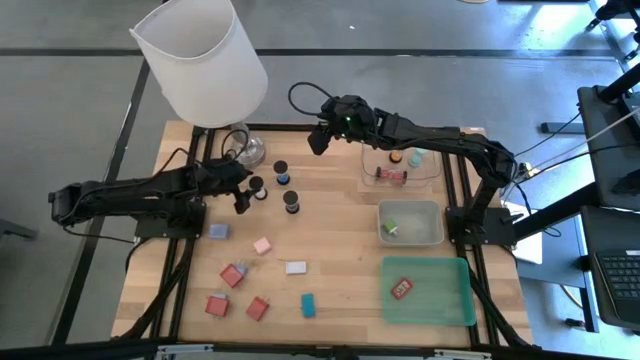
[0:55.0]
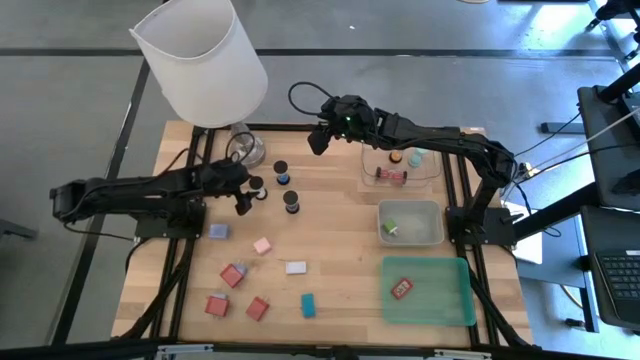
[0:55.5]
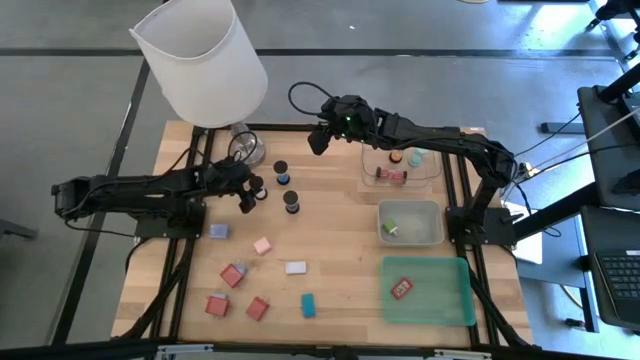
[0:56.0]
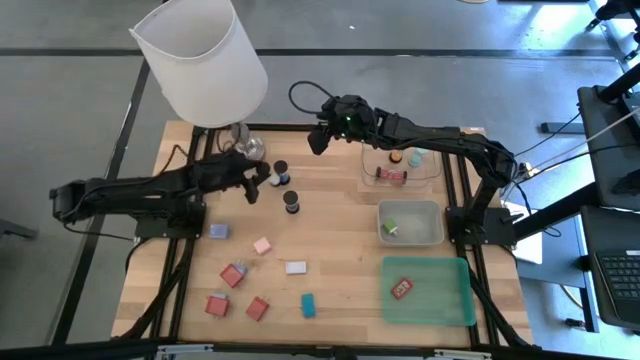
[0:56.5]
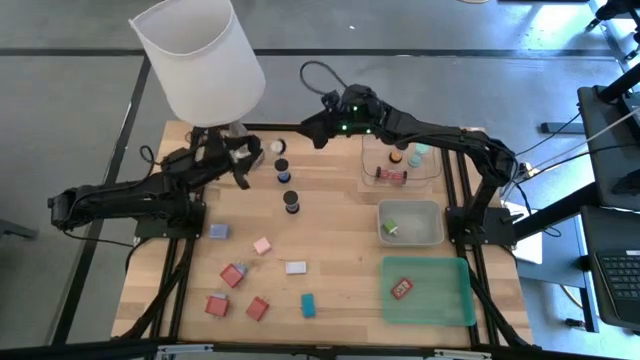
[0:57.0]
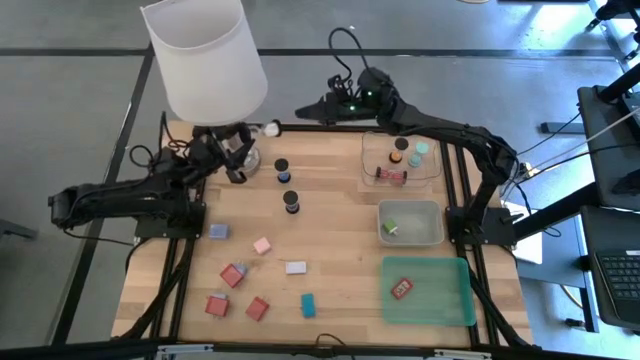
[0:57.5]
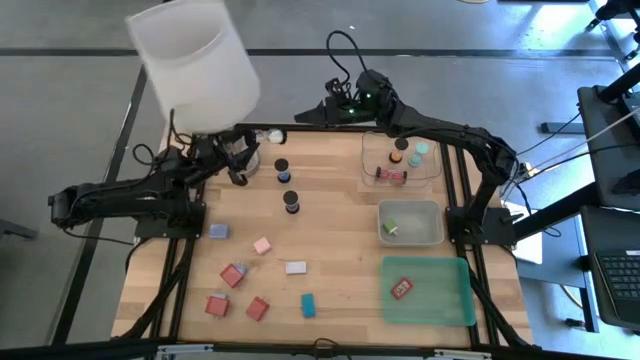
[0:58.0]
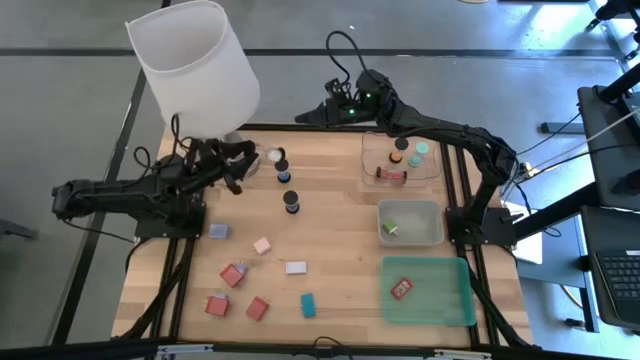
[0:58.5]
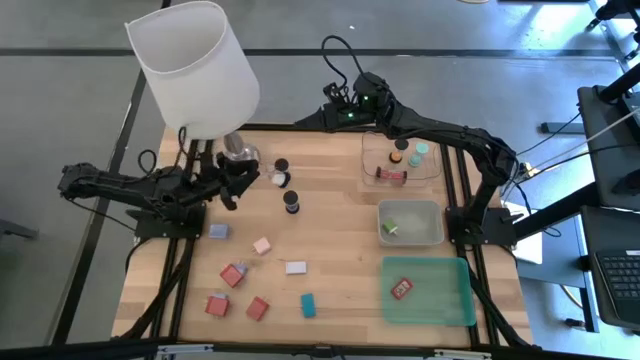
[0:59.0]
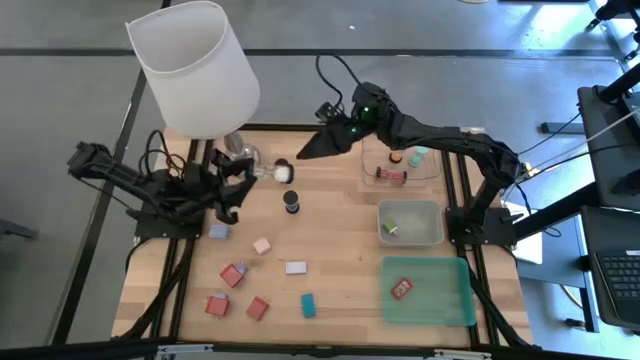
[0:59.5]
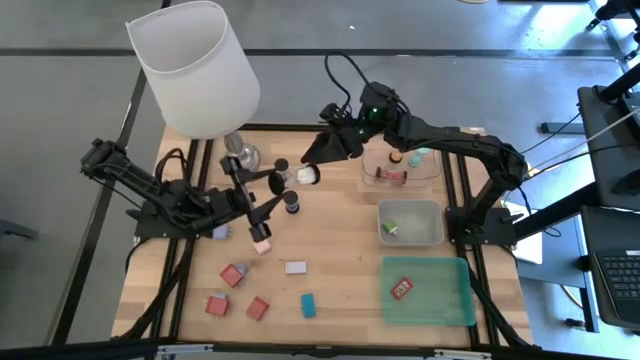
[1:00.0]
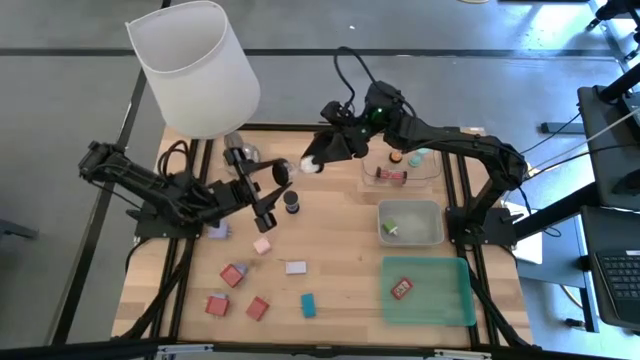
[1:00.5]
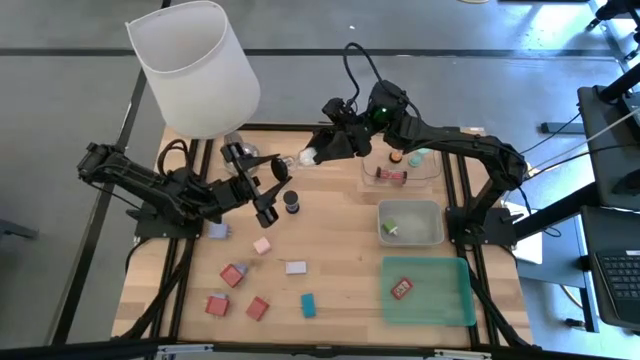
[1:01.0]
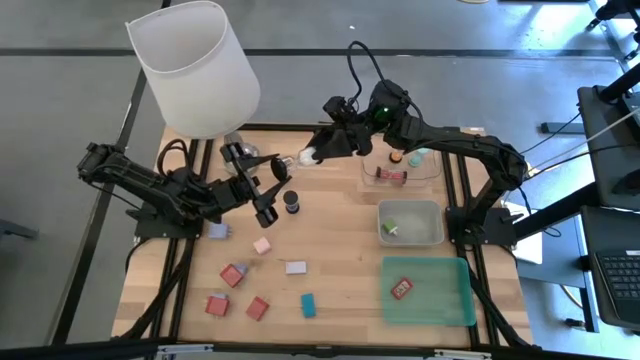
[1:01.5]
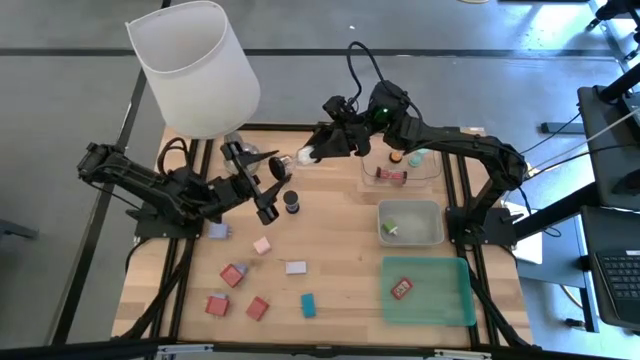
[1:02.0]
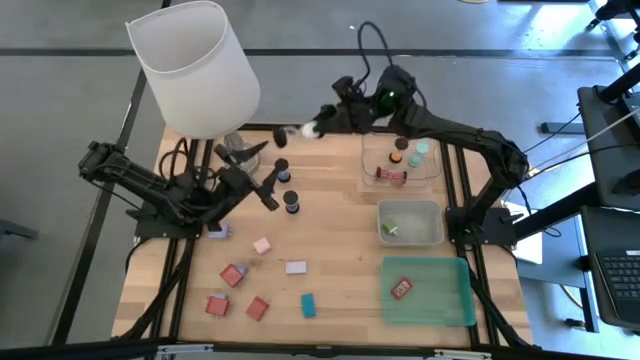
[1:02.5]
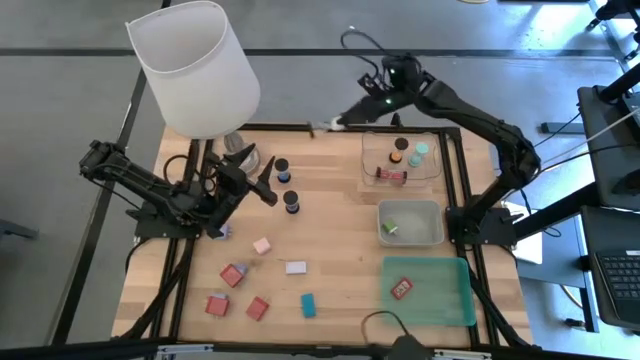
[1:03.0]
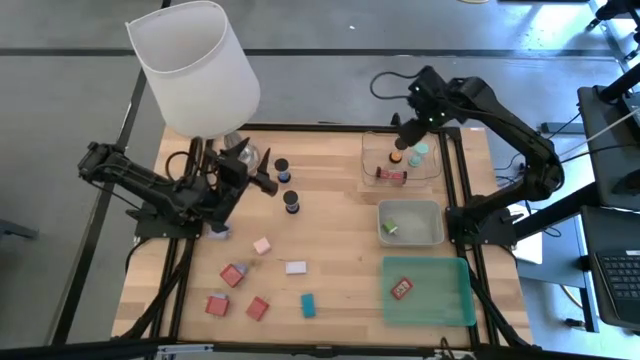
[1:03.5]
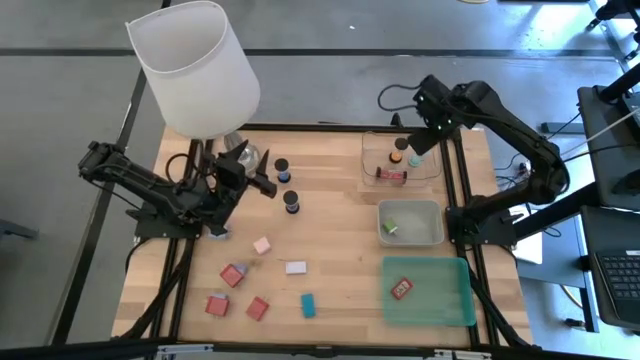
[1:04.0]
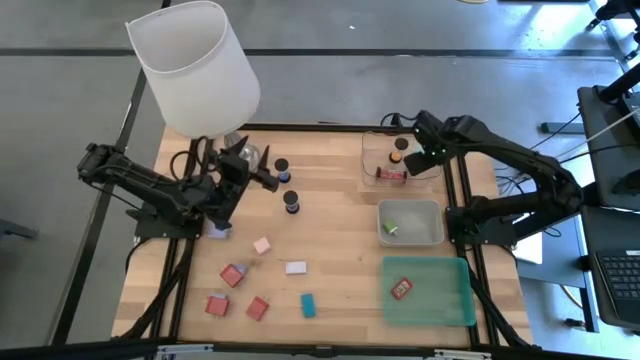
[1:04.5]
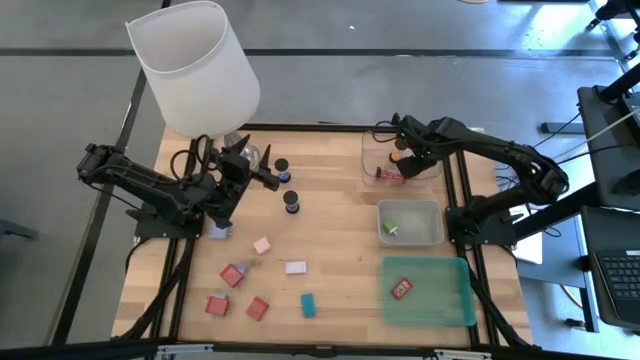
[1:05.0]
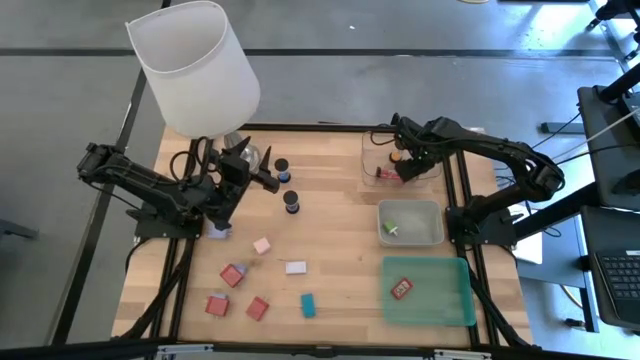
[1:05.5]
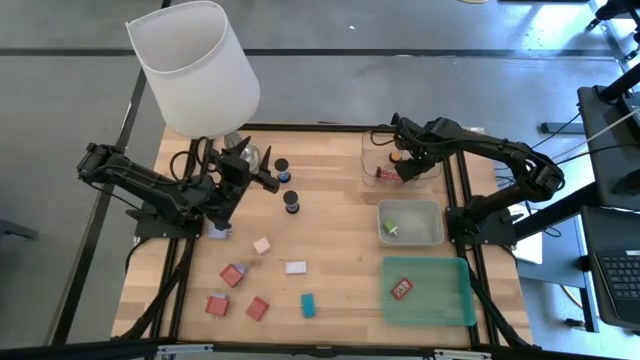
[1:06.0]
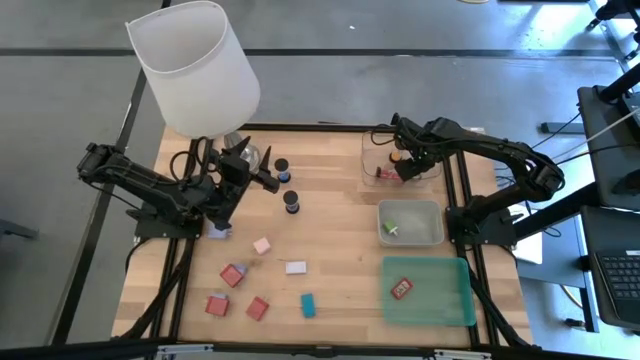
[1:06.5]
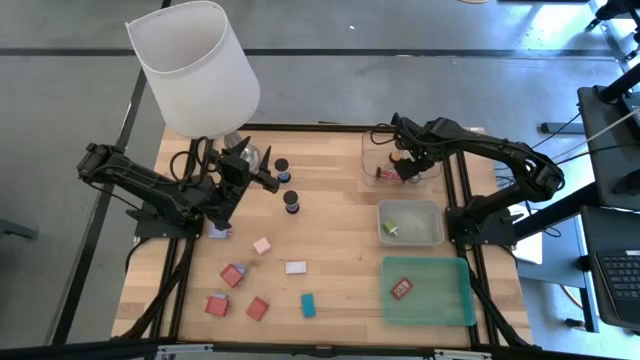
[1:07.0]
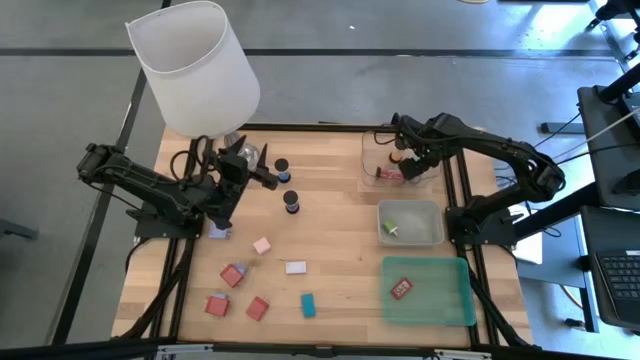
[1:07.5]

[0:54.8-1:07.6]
Task: Pick & Place Office items
Put the white hourglass into the transparent bin

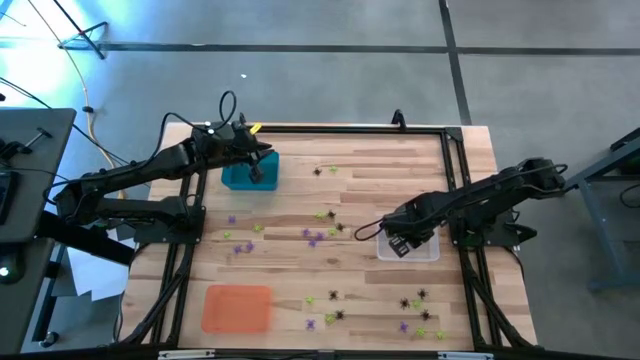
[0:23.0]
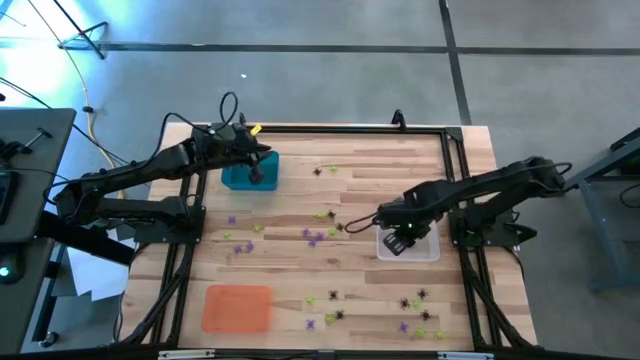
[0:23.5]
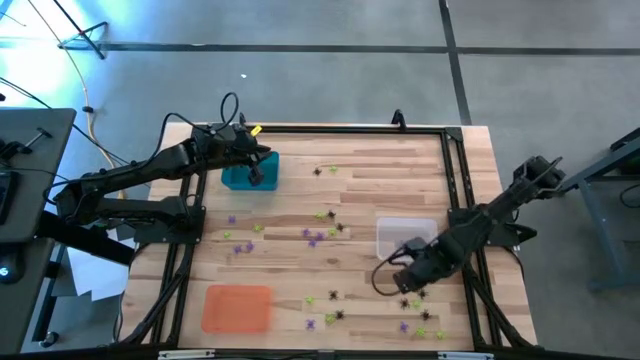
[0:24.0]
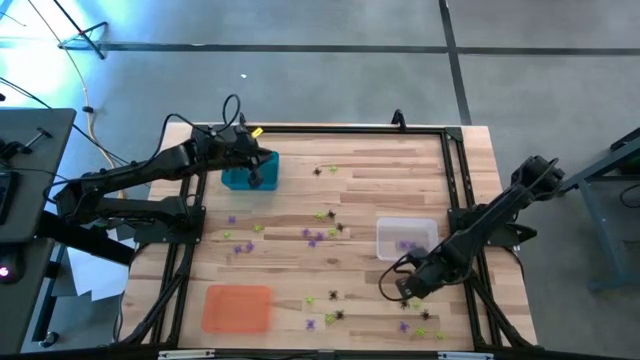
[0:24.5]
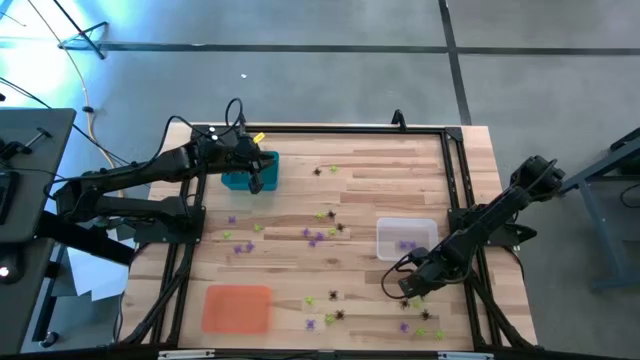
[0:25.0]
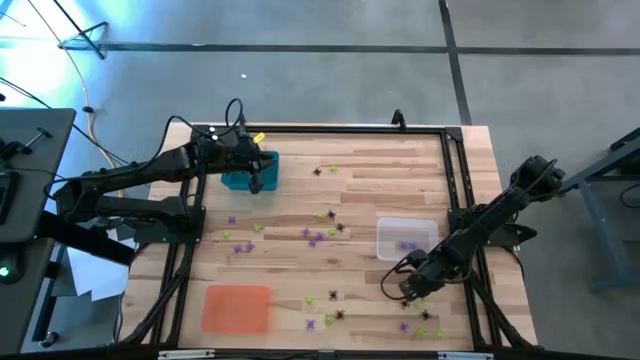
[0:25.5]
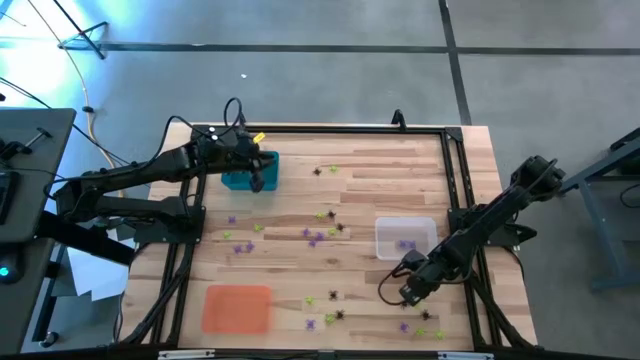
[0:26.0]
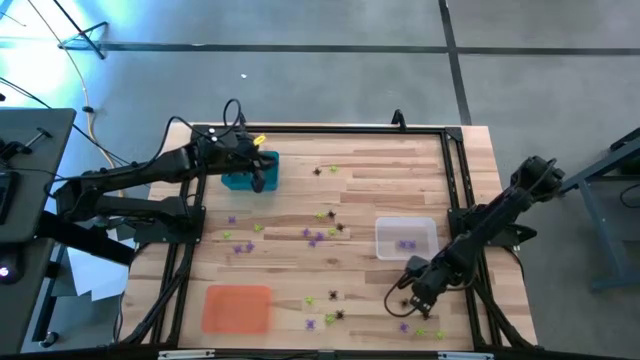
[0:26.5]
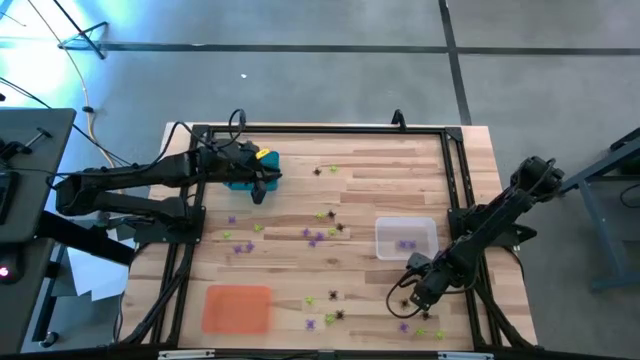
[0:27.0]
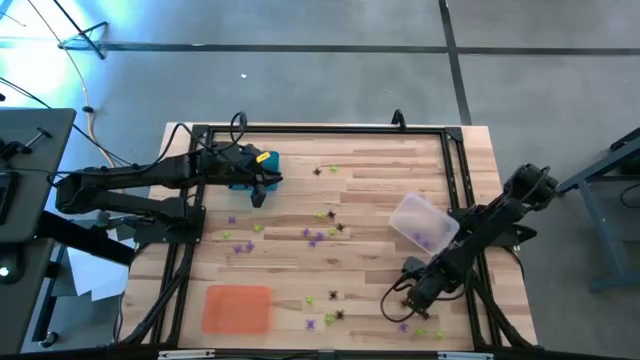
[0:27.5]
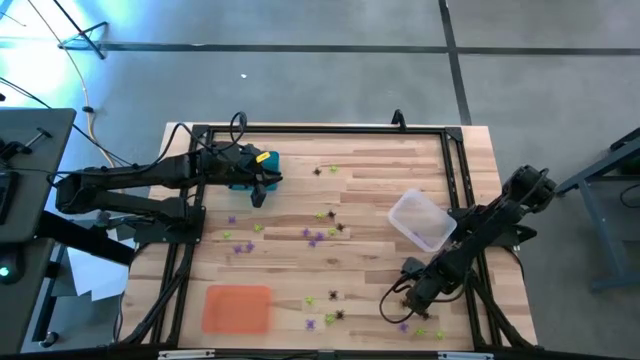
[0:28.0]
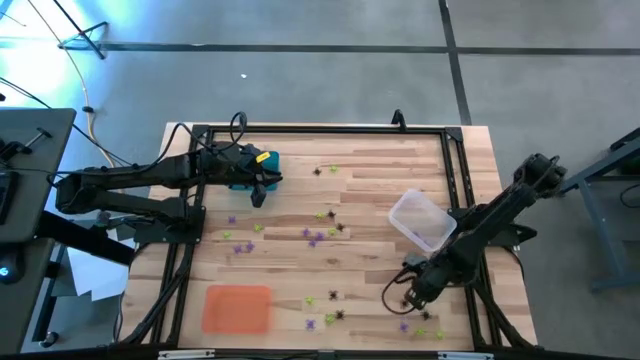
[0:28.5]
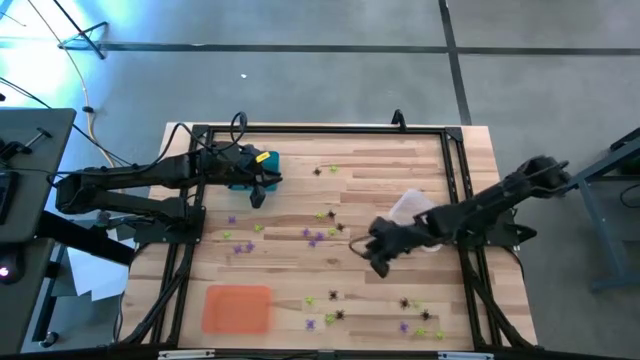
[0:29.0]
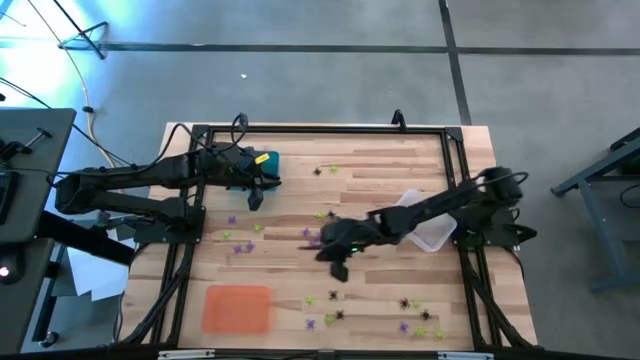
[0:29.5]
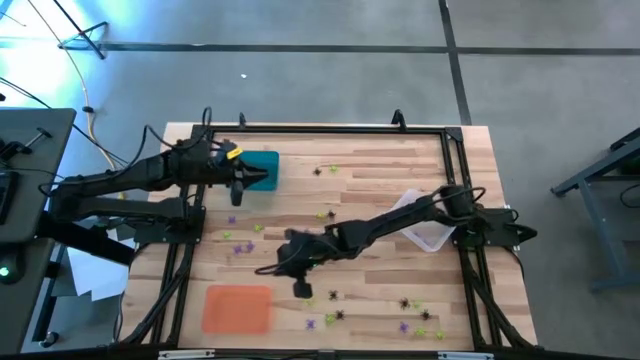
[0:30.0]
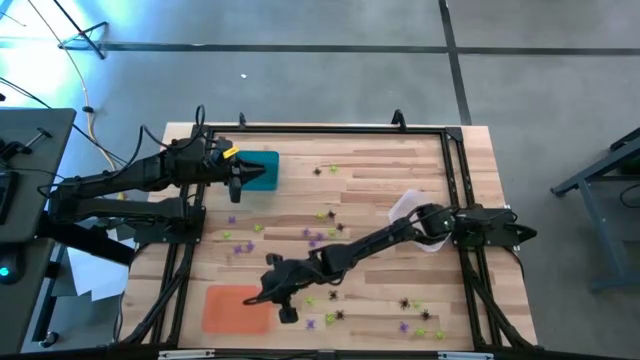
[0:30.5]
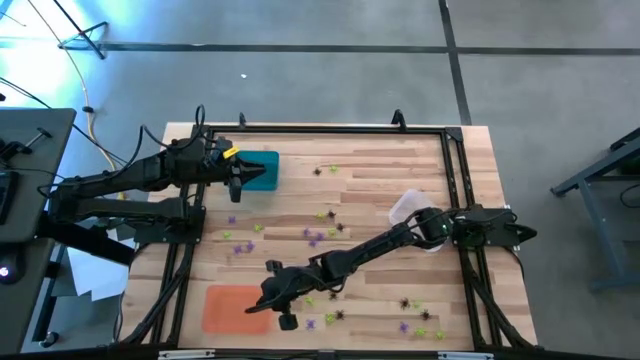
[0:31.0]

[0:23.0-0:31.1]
Task: Sort Halloween decoration
Put the black spider toy into the orange bin
